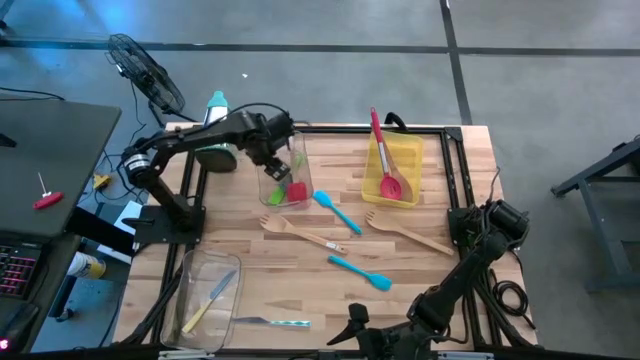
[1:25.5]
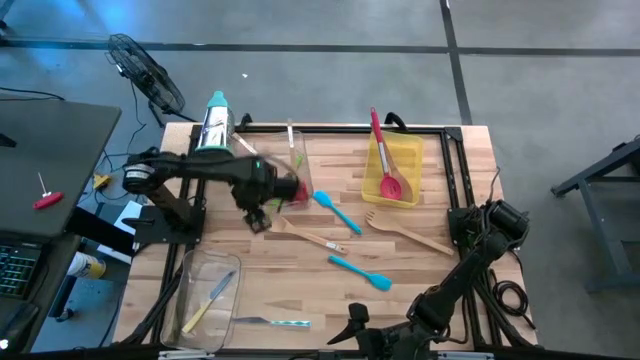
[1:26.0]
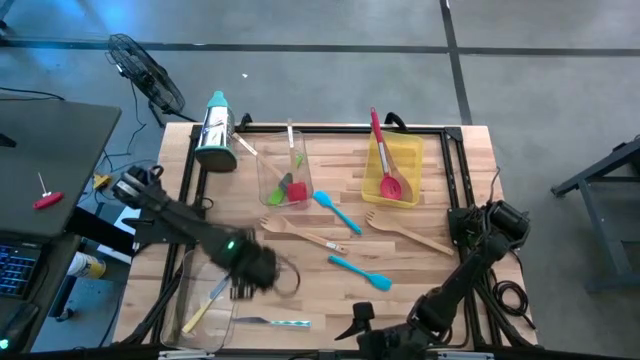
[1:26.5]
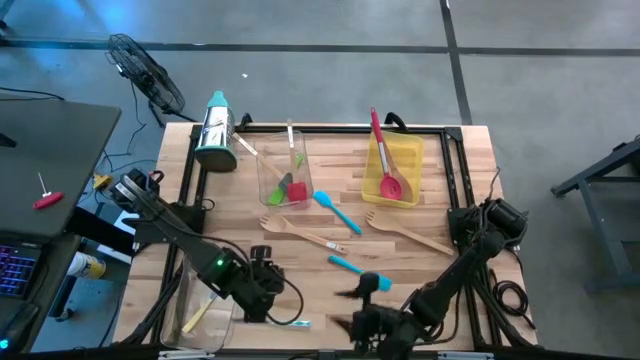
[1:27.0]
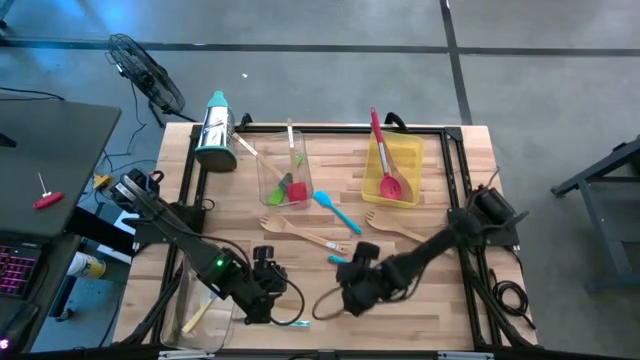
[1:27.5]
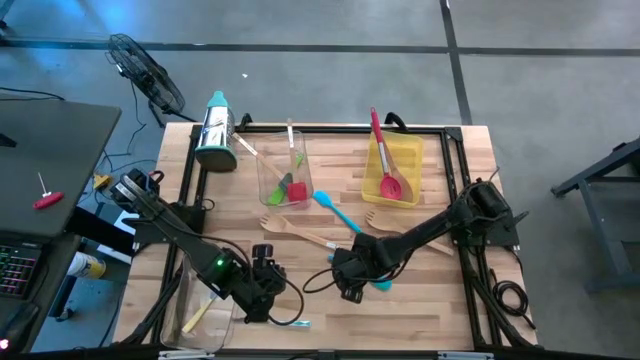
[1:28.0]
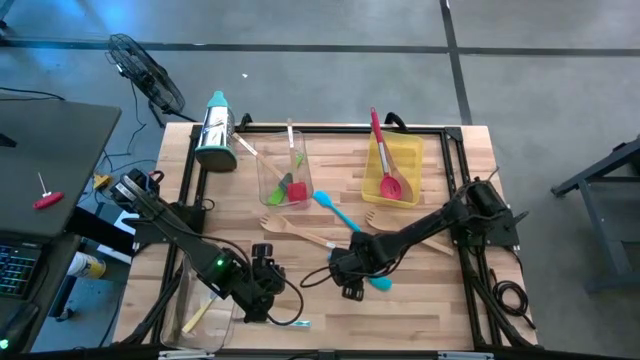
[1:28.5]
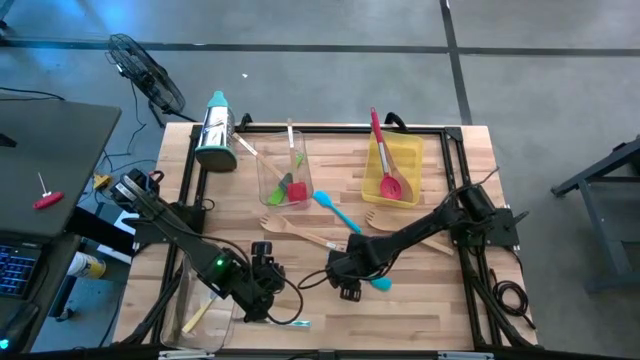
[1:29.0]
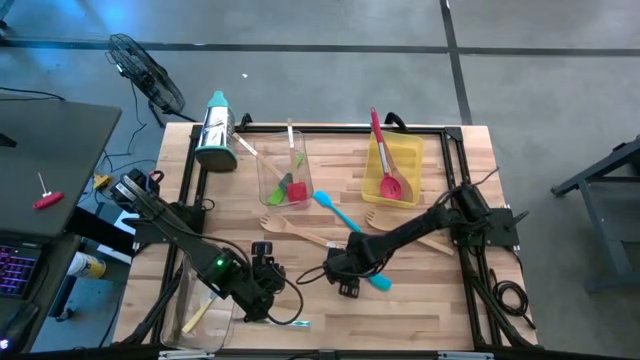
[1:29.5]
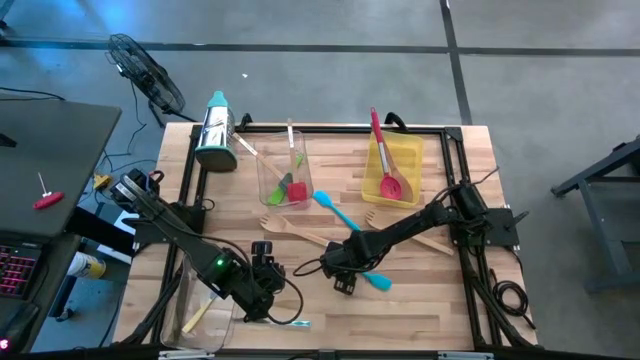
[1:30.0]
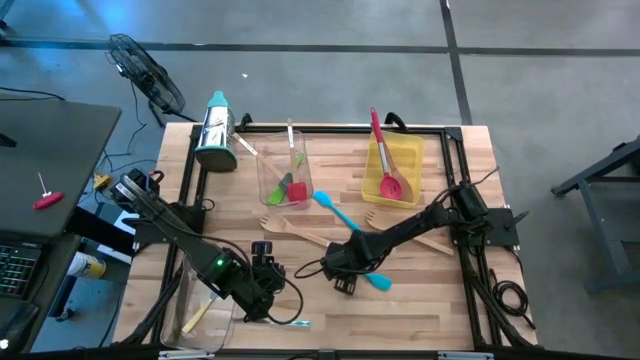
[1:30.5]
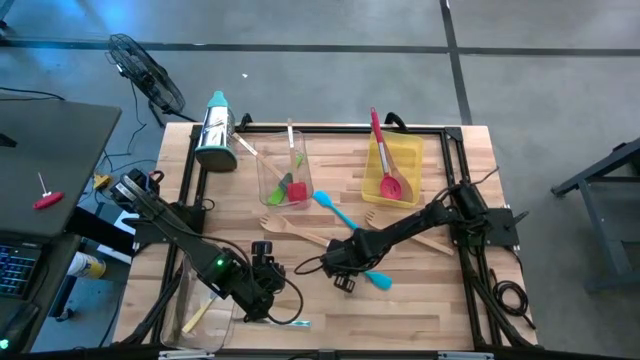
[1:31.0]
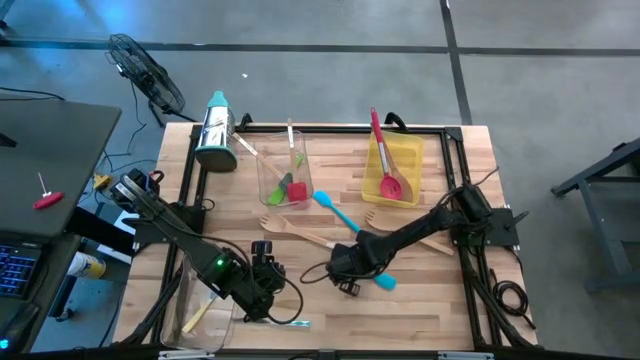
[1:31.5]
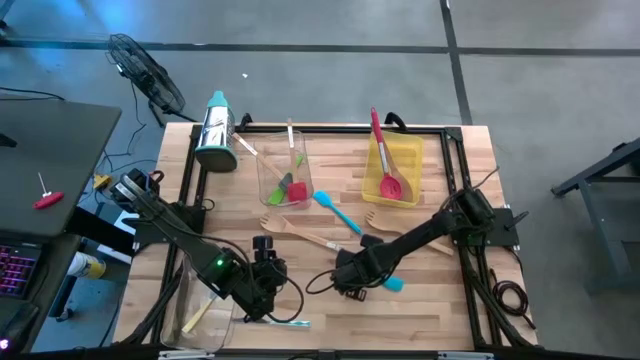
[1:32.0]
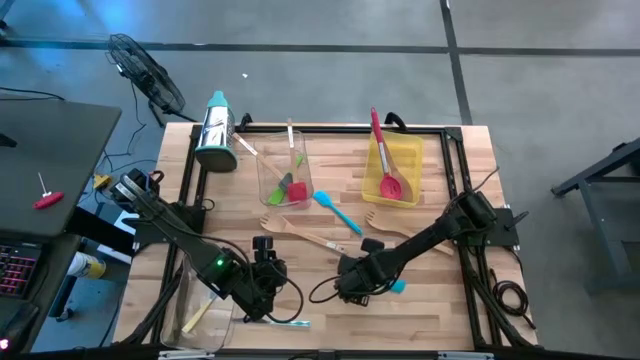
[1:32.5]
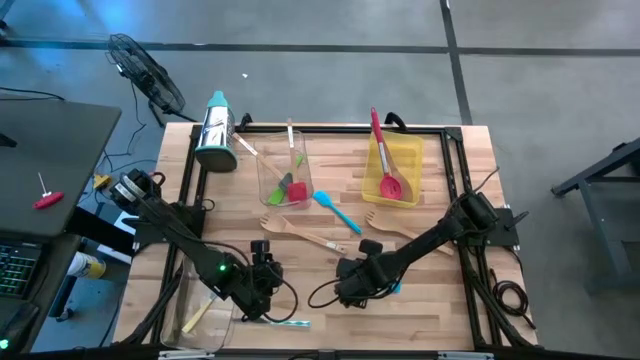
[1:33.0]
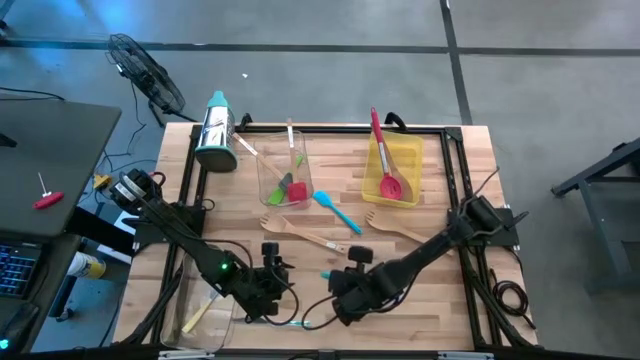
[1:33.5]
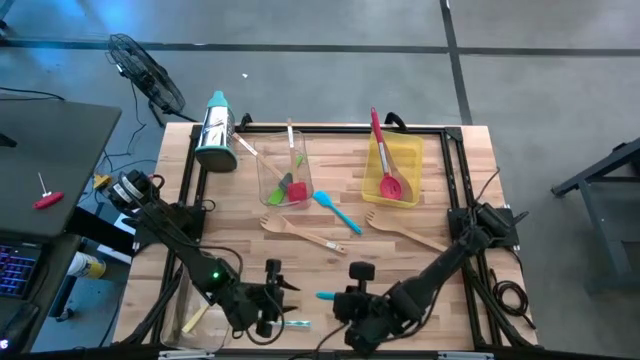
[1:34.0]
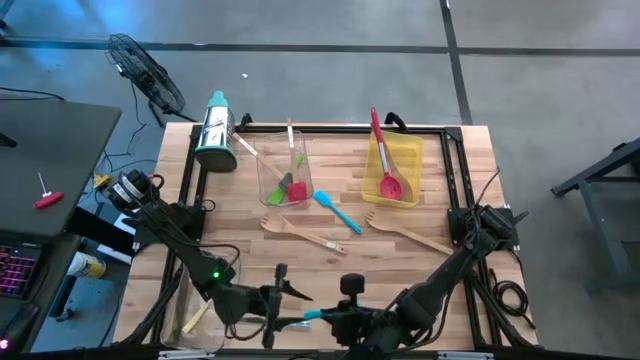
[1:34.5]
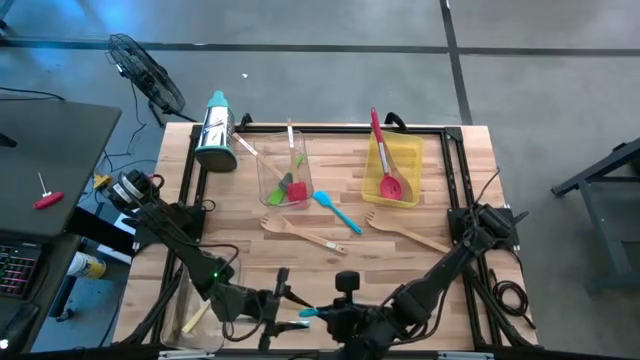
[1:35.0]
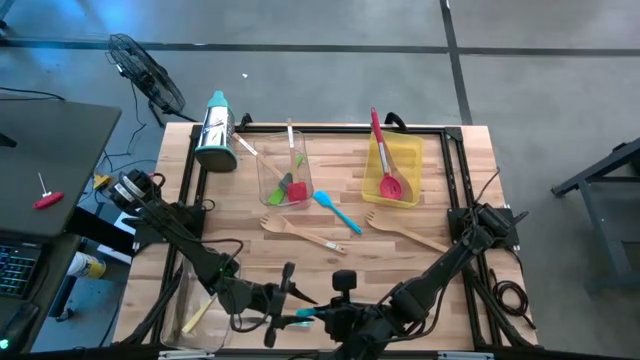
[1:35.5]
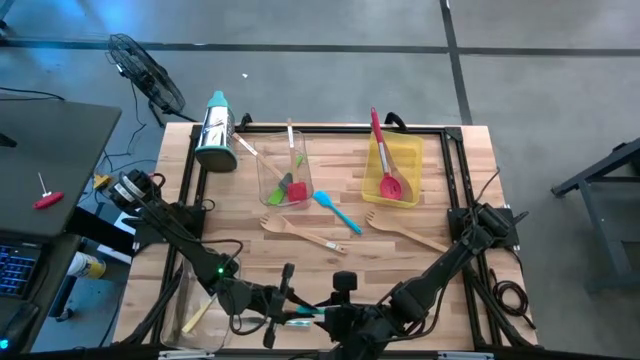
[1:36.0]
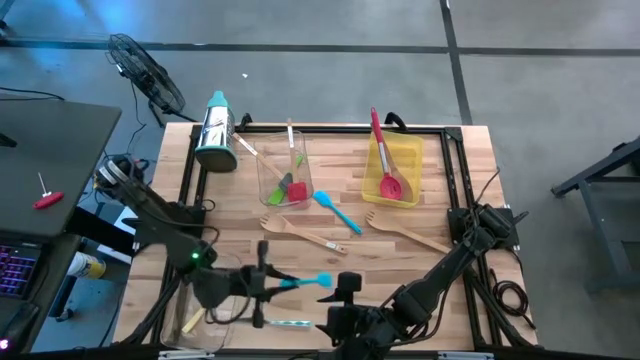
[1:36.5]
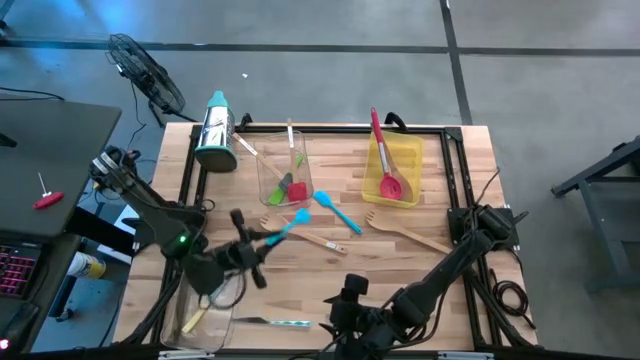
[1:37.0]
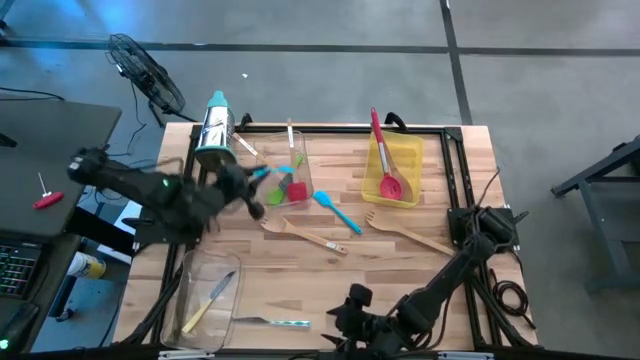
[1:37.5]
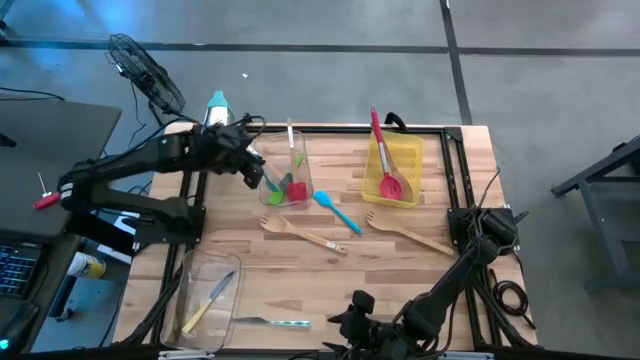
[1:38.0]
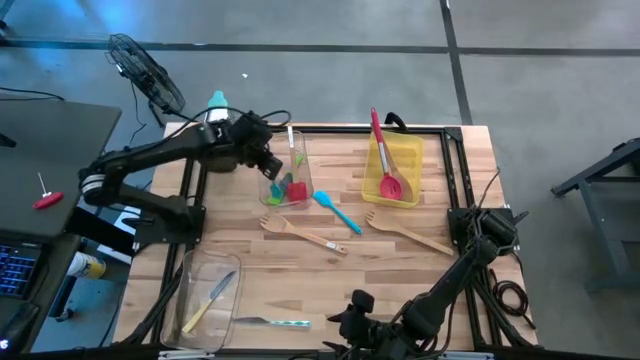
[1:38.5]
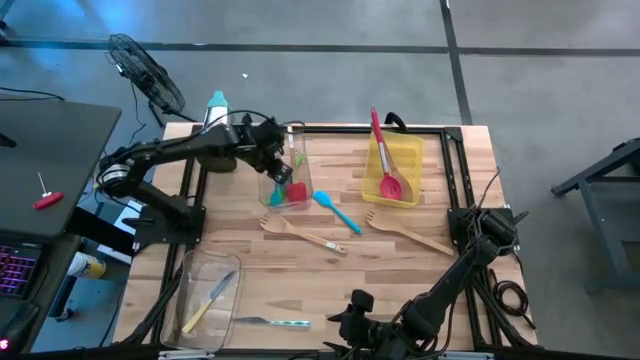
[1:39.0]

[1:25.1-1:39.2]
Task: Pick & Place Kitchen Items
Put the bottom blue spatula into the top transparent bin

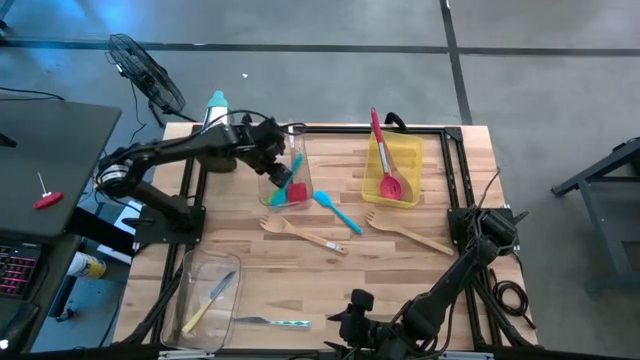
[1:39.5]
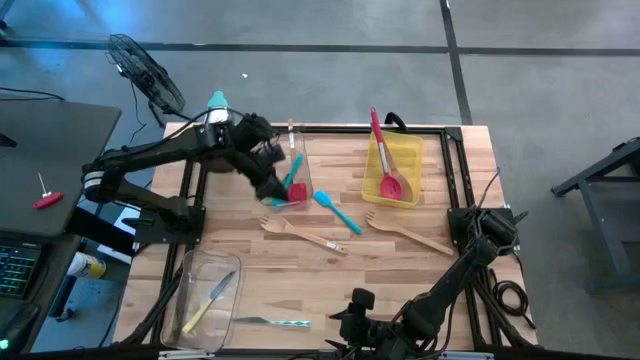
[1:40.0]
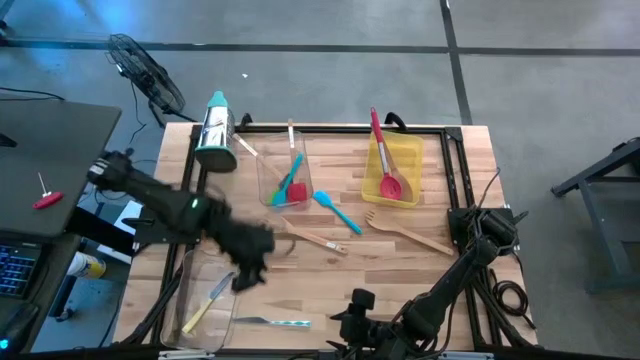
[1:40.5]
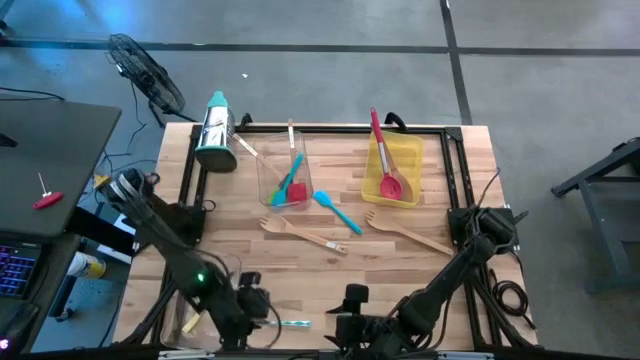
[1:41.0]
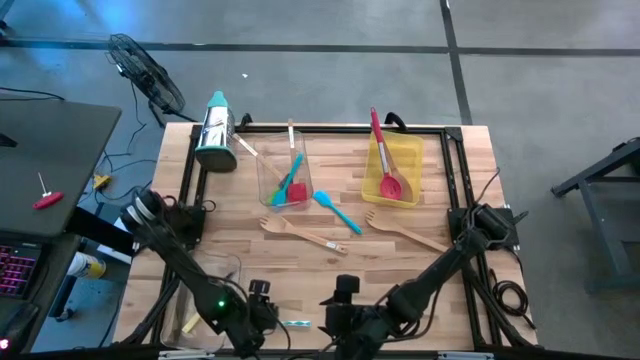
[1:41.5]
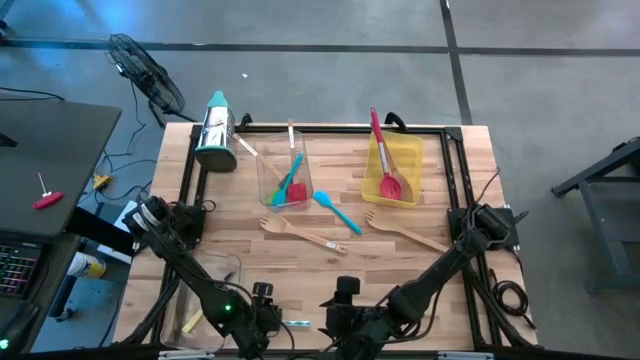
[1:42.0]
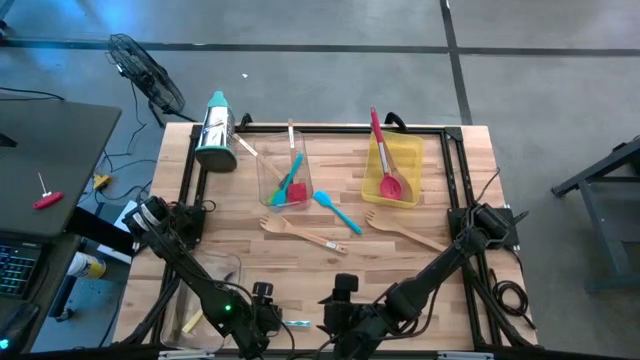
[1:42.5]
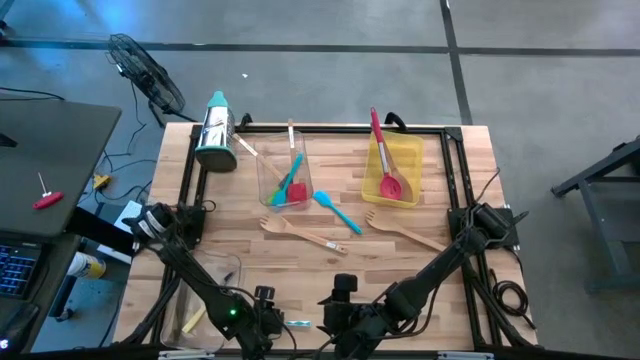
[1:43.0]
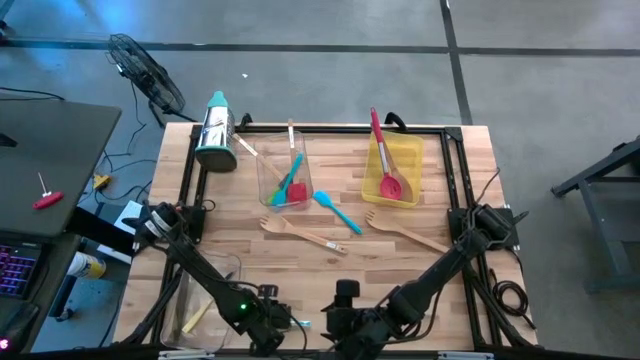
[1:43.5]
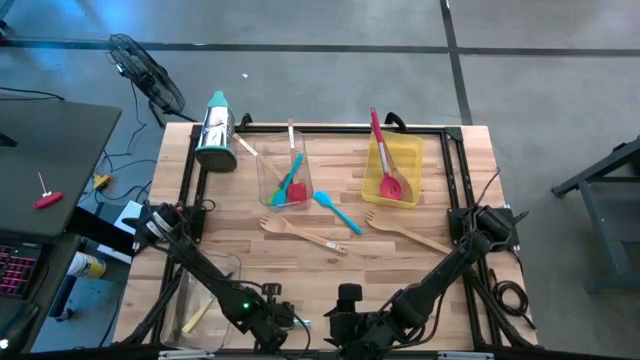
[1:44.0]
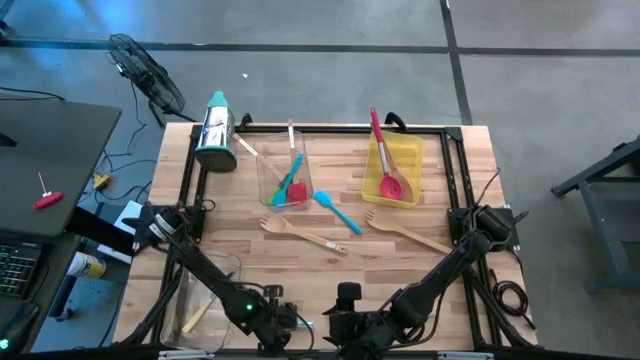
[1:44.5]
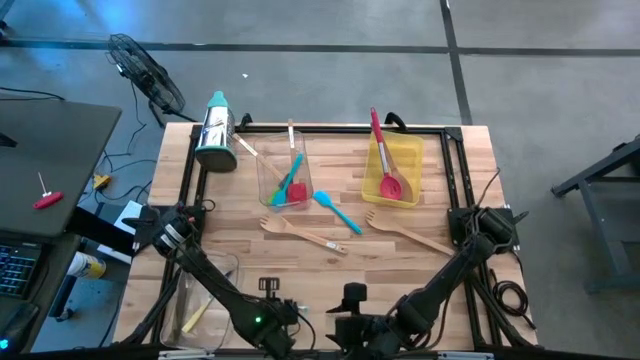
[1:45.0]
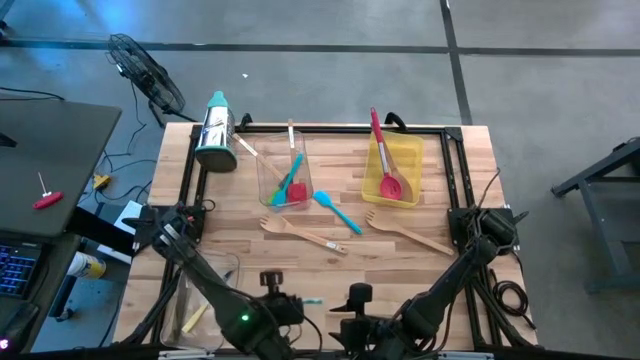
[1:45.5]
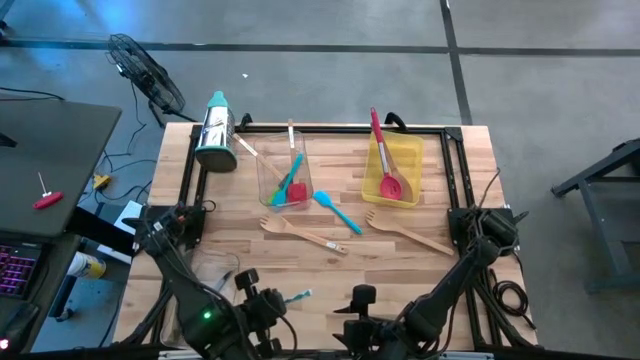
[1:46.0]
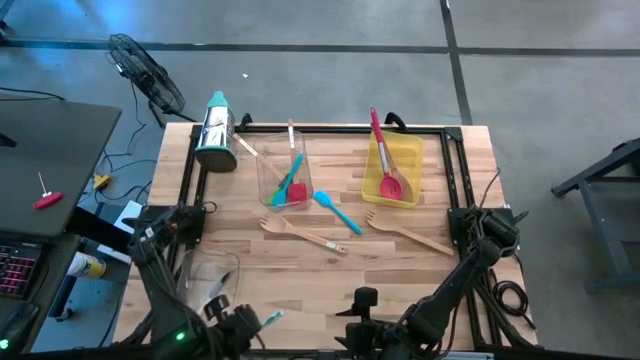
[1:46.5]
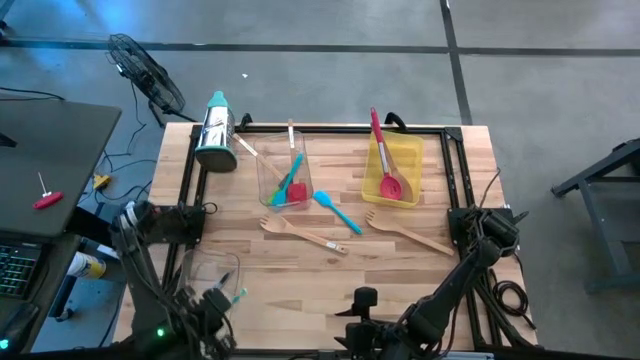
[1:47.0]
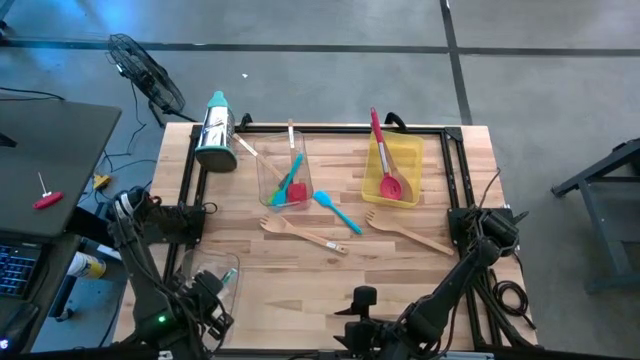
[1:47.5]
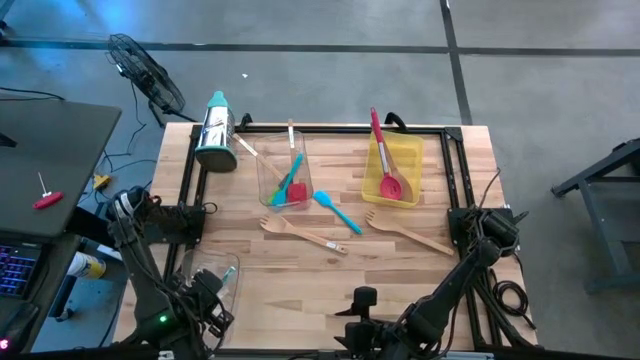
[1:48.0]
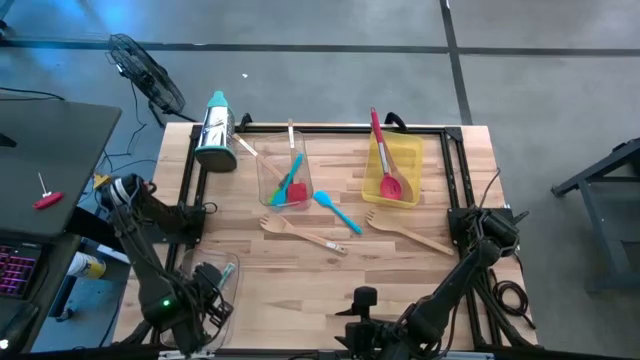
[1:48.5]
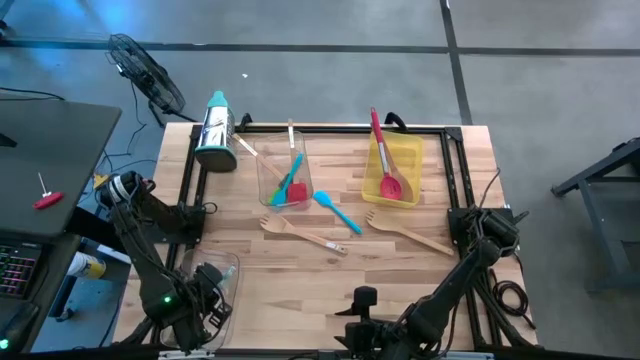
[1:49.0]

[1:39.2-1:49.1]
Put the white blue table knife into the bottom transparent bin
